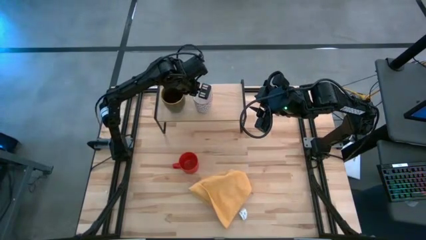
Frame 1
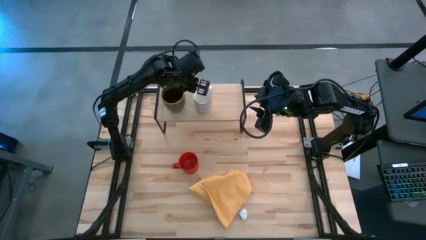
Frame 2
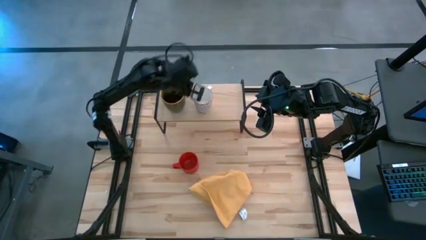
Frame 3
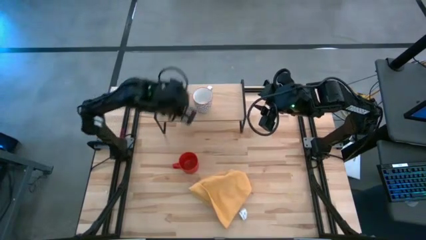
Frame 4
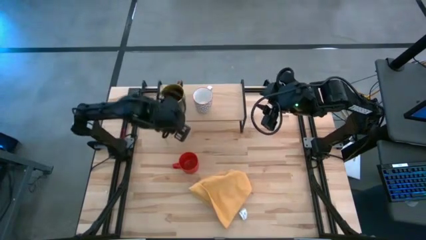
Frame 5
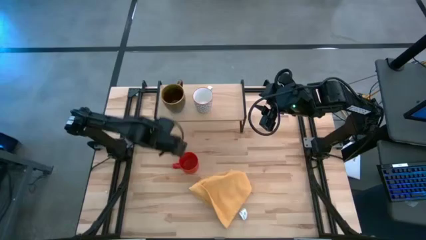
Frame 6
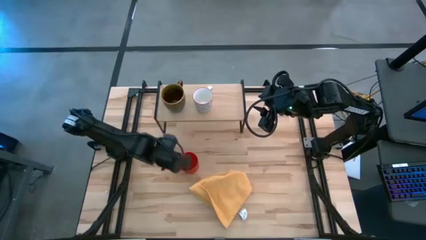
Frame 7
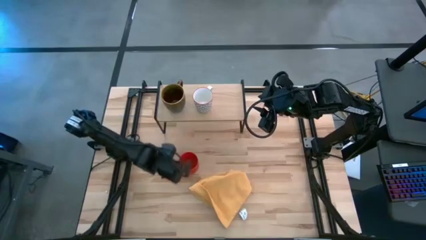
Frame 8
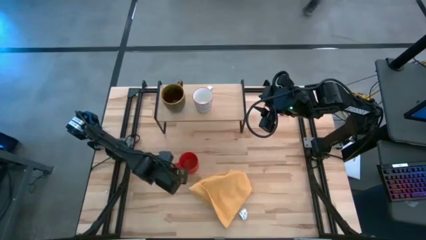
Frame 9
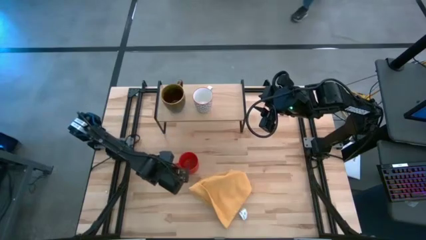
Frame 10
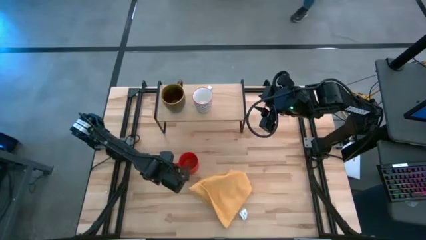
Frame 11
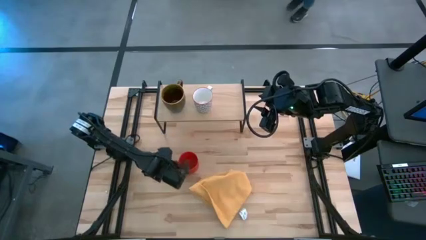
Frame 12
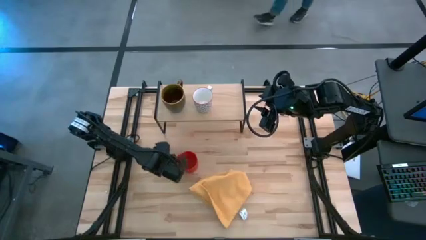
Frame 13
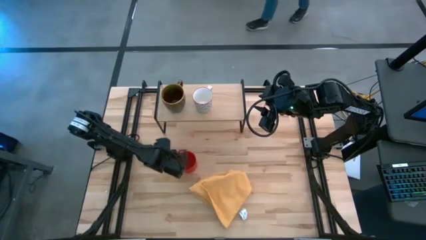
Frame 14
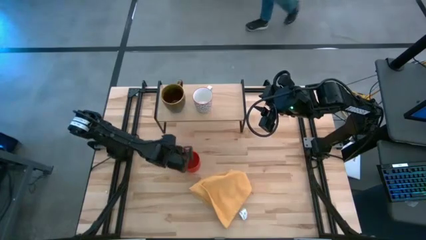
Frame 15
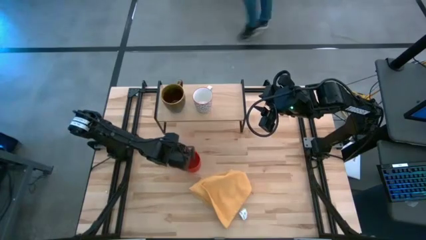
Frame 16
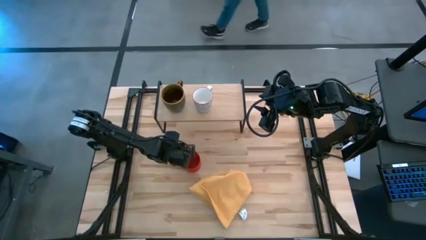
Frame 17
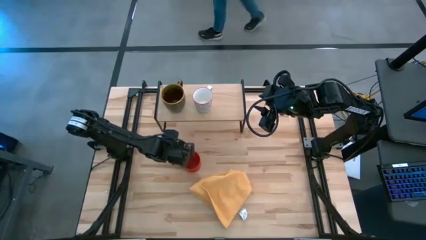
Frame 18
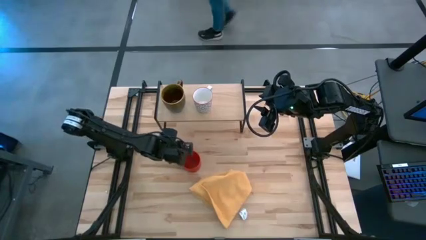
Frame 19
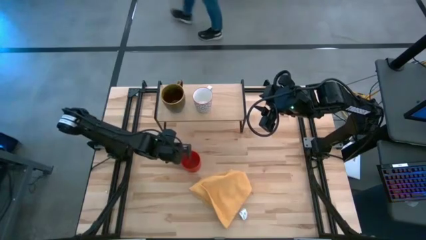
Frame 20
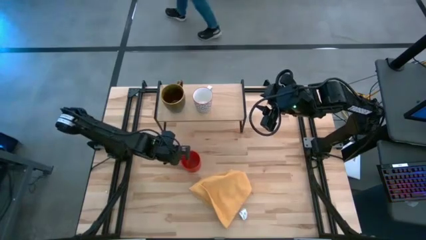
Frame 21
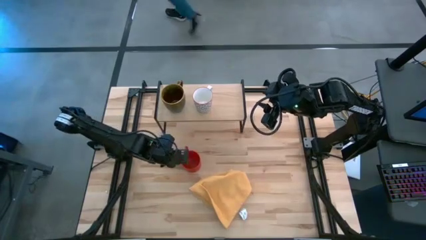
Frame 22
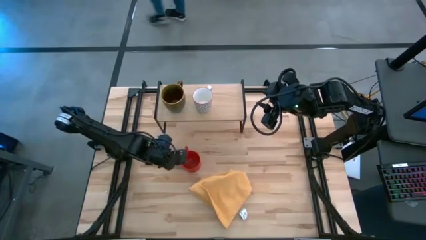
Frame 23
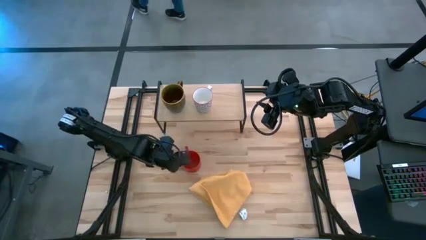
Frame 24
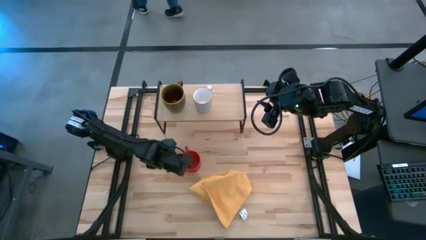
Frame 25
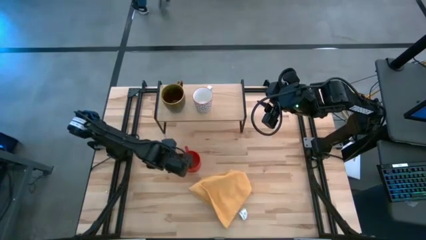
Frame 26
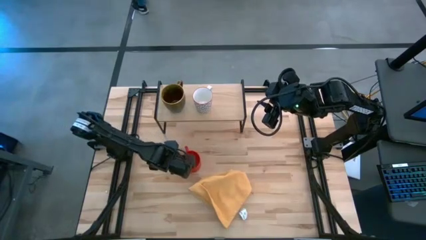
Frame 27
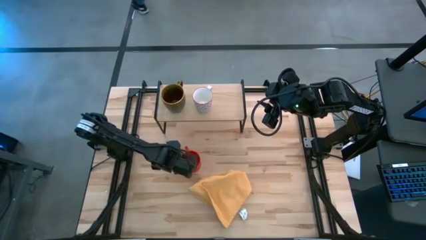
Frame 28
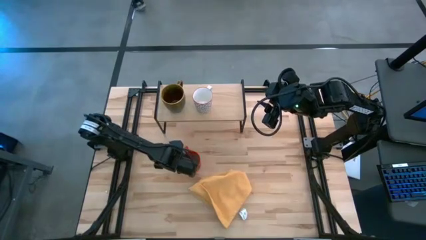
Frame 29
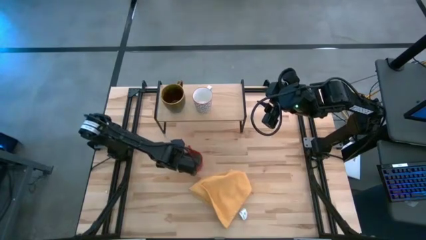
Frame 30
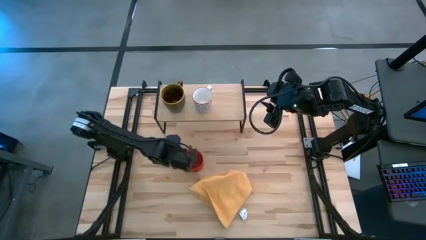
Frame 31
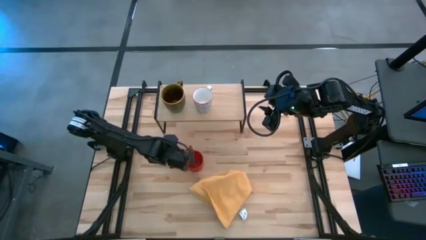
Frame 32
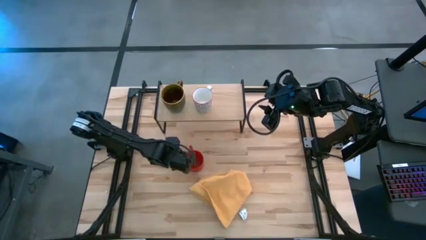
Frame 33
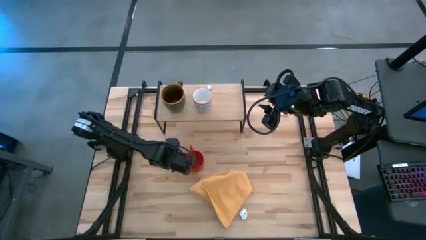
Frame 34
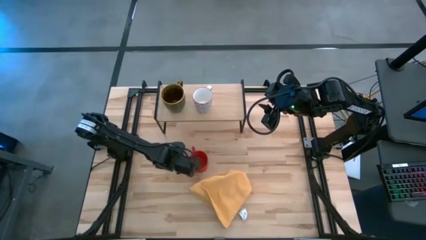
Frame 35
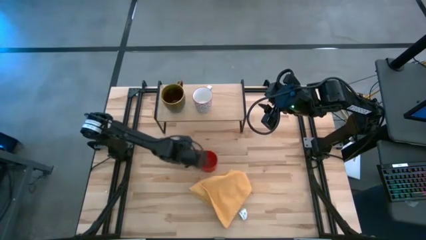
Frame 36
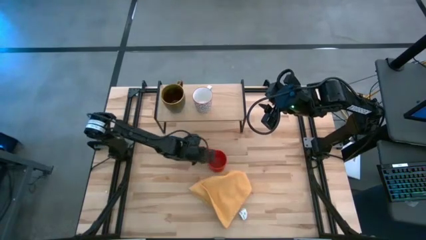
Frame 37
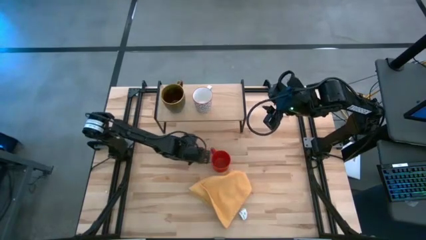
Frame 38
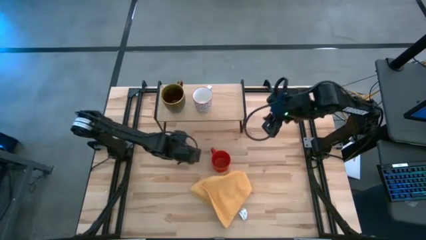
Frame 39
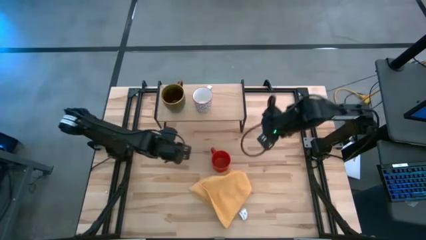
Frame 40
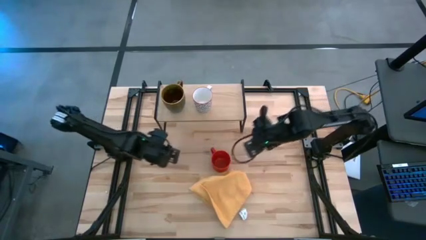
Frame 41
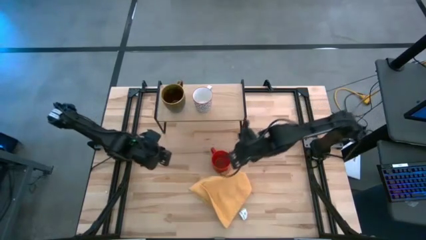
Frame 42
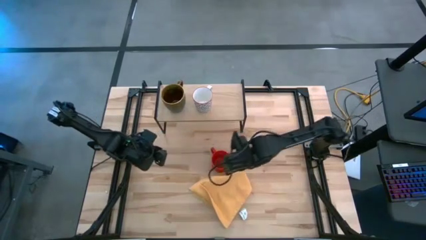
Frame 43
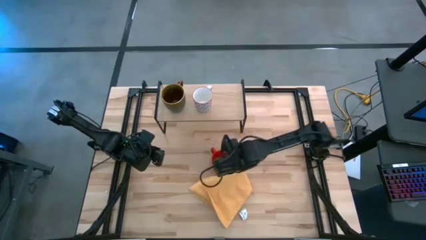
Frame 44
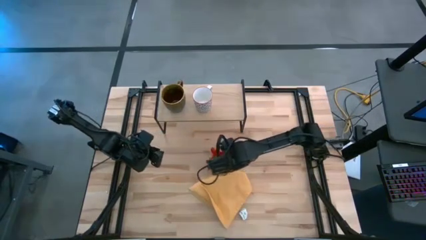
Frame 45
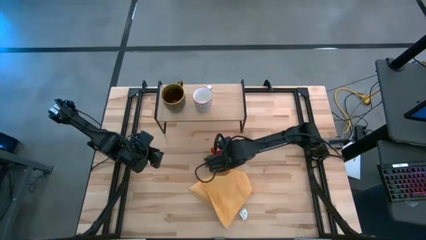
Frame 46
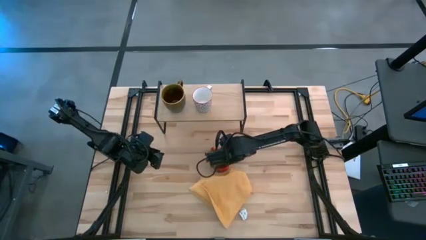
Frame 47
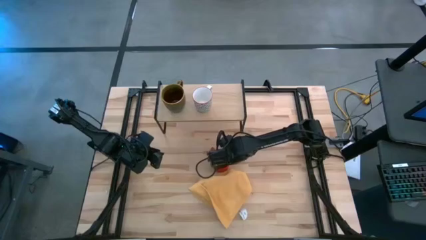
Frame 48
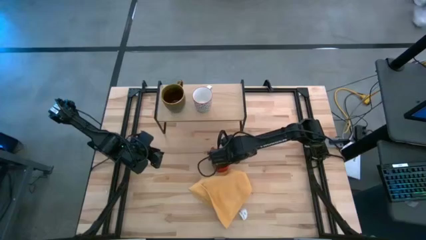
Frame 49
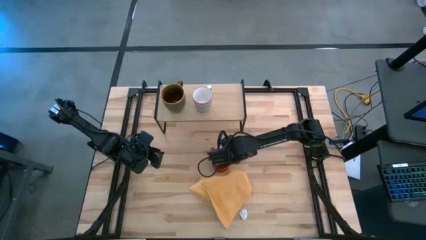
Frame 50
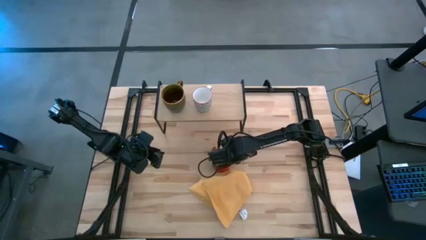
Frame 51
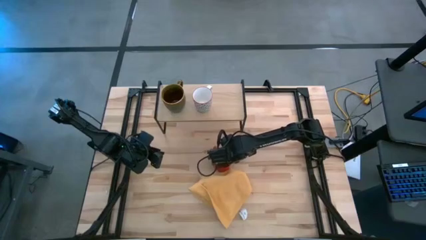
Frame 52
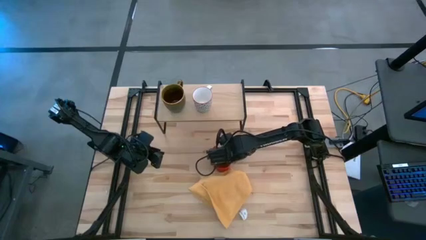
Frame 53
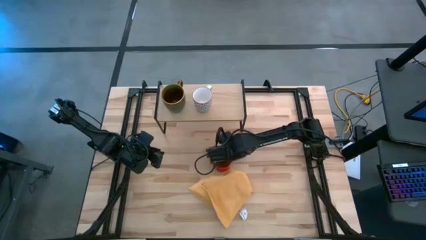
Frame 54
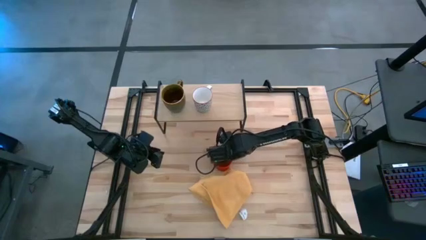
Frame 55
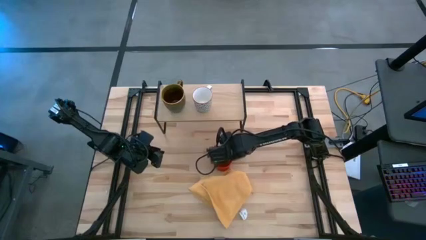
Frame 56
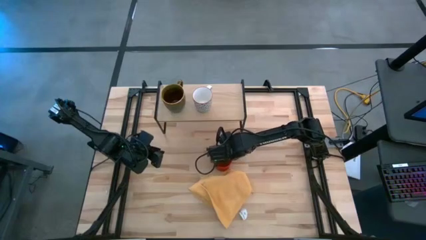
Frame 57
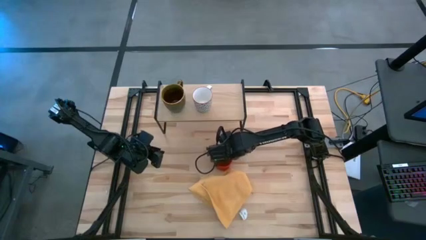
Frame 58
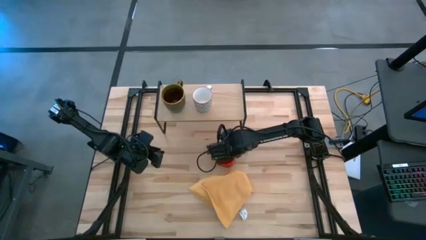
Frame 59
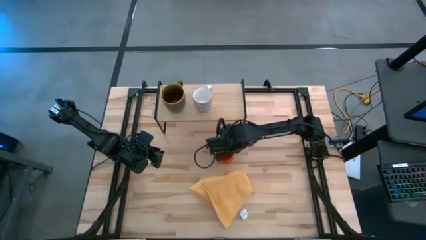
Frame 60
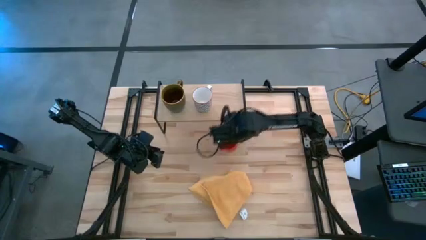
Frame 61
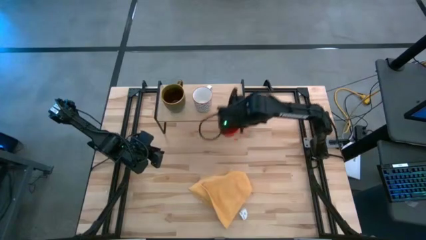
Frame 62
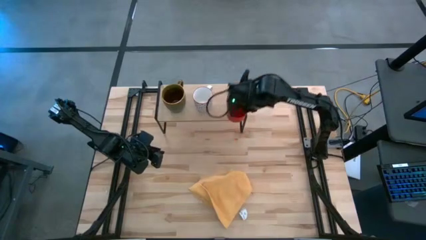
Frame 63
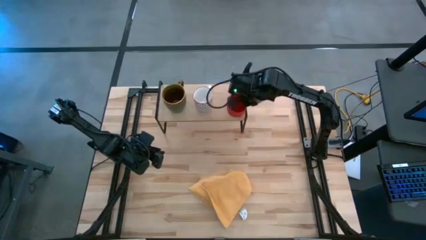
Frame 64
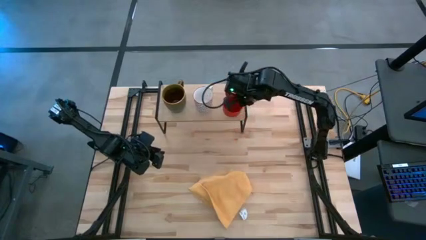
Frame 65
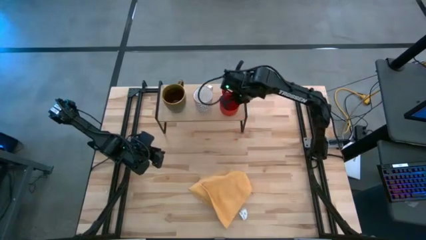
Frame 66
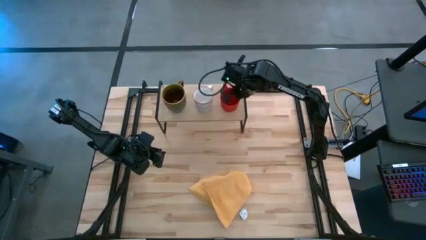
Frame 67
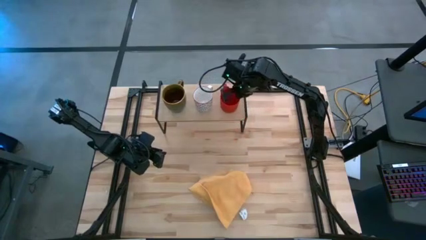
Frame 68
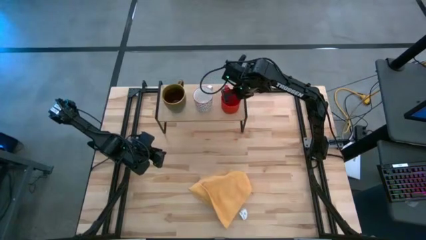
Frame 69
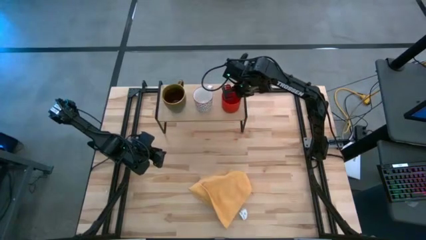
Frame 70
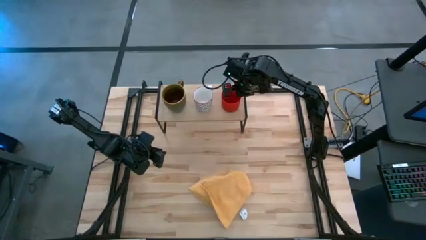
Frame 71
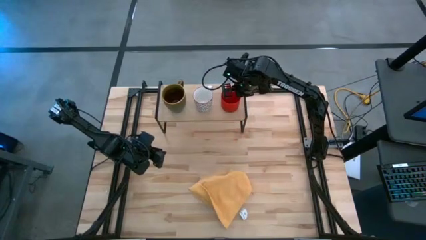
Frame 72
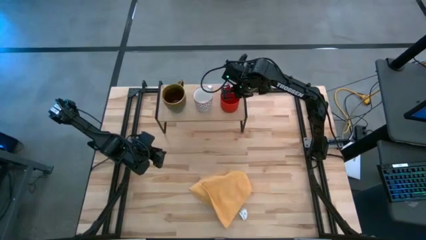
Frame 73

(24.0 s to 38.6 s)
Task: Stack small to large cups/mugs on shelf
Put the red mug on the shelf
